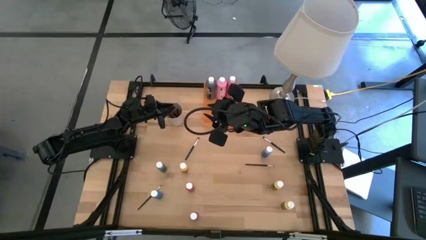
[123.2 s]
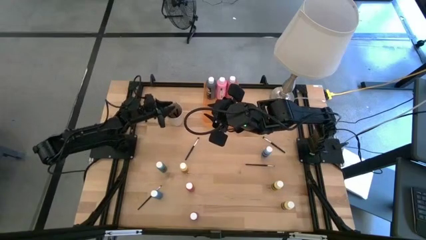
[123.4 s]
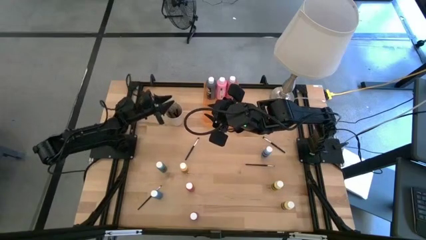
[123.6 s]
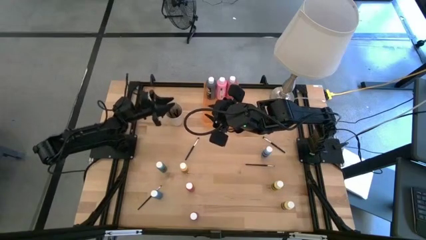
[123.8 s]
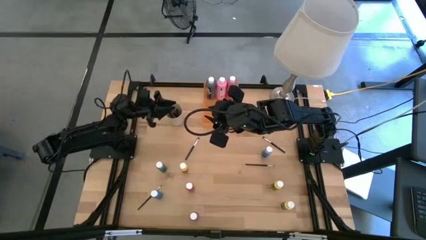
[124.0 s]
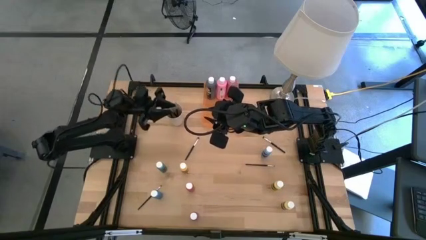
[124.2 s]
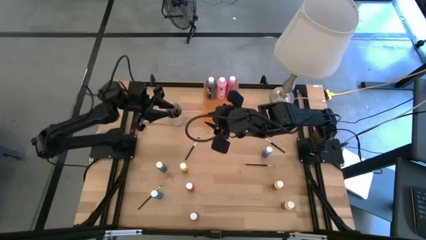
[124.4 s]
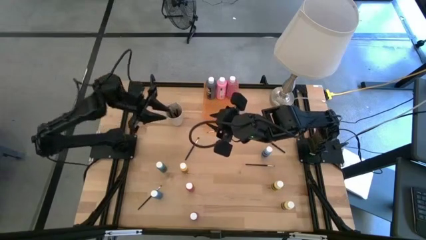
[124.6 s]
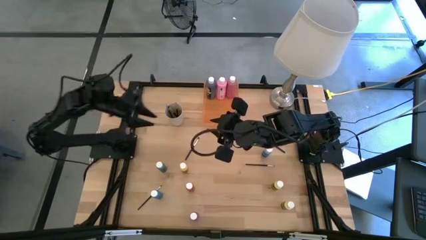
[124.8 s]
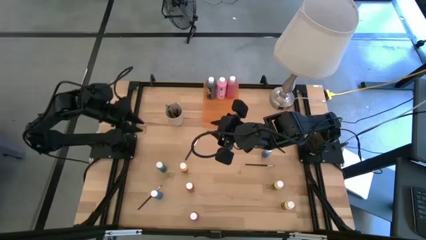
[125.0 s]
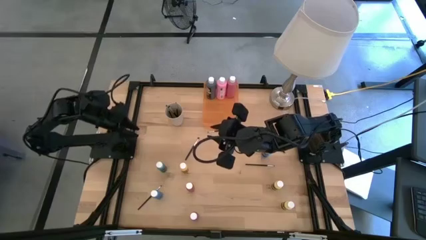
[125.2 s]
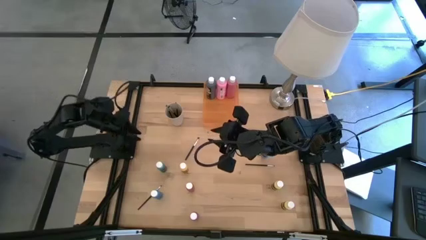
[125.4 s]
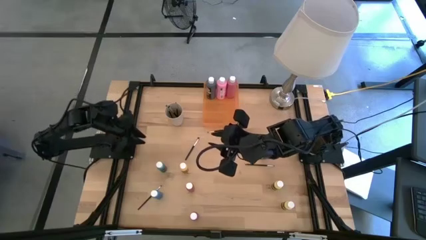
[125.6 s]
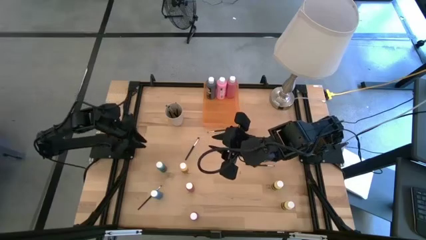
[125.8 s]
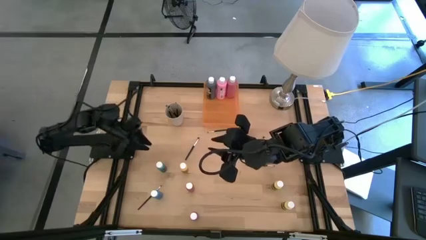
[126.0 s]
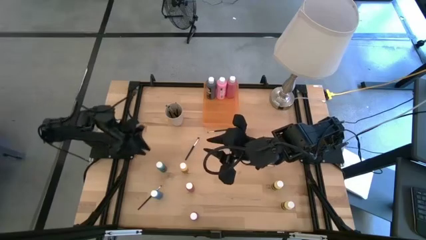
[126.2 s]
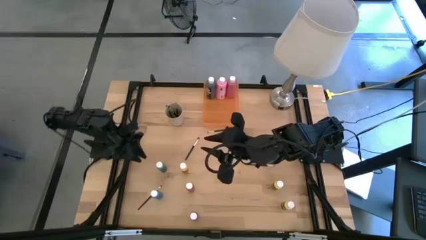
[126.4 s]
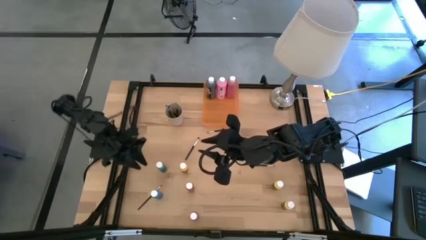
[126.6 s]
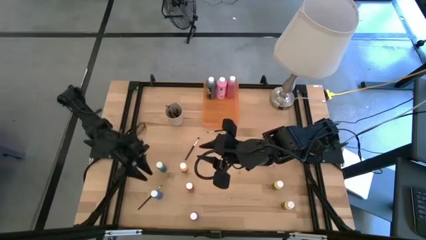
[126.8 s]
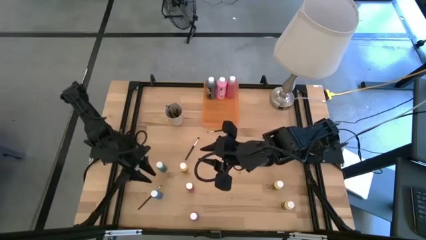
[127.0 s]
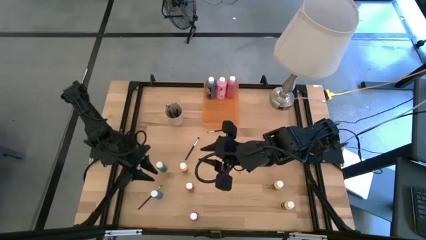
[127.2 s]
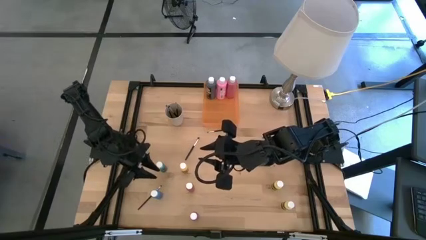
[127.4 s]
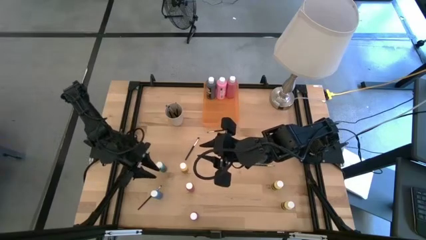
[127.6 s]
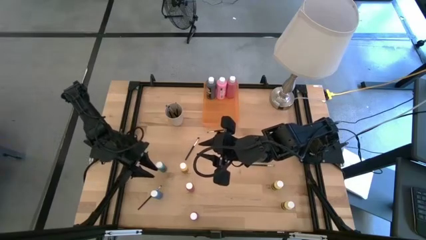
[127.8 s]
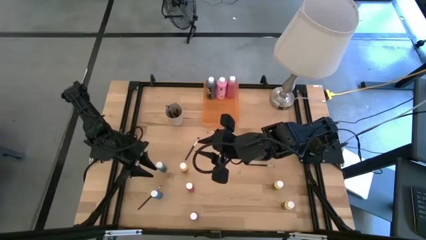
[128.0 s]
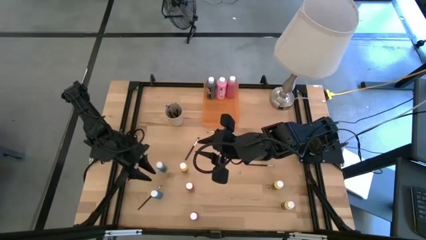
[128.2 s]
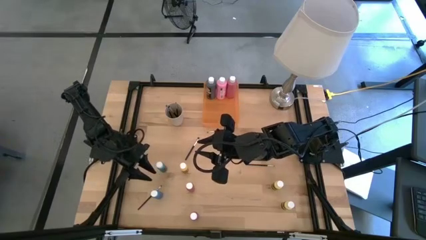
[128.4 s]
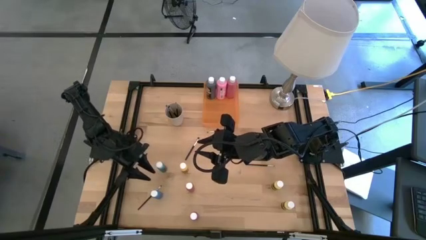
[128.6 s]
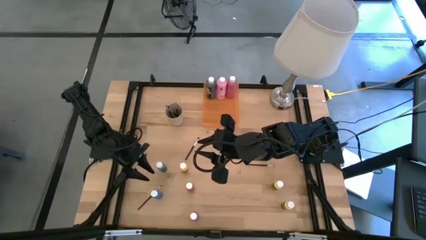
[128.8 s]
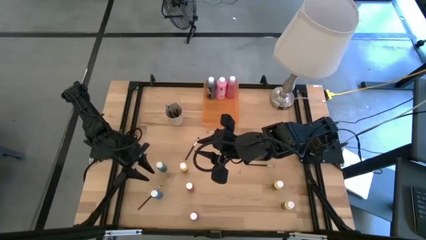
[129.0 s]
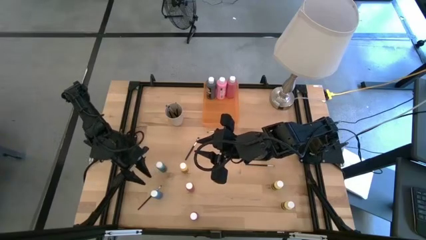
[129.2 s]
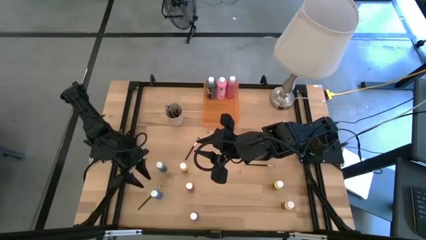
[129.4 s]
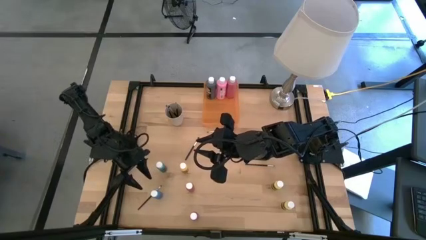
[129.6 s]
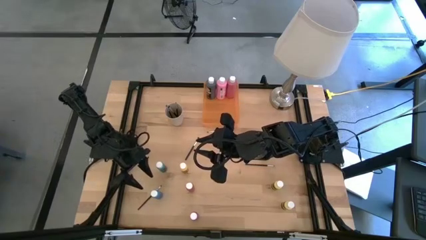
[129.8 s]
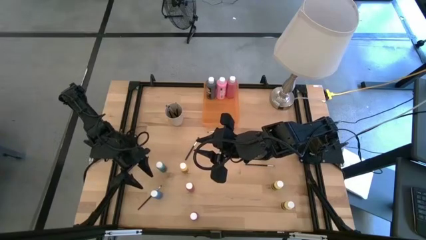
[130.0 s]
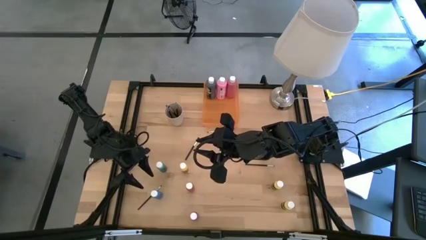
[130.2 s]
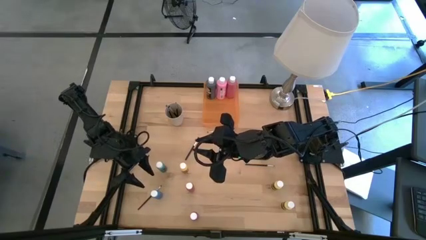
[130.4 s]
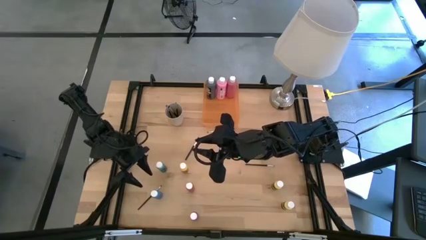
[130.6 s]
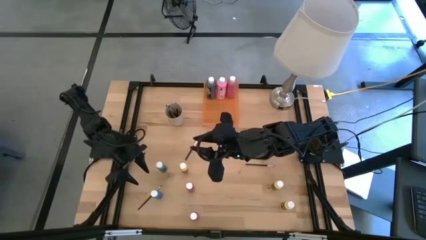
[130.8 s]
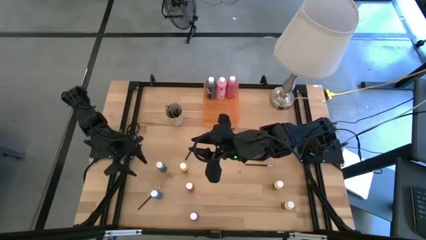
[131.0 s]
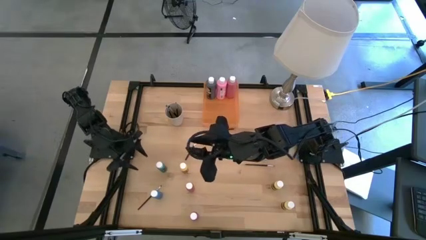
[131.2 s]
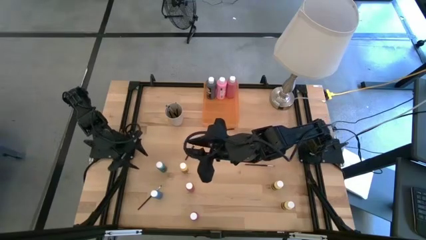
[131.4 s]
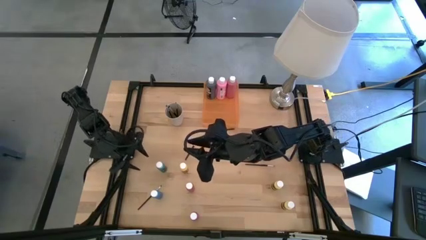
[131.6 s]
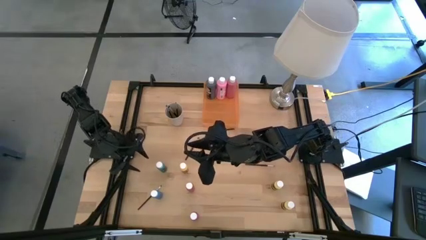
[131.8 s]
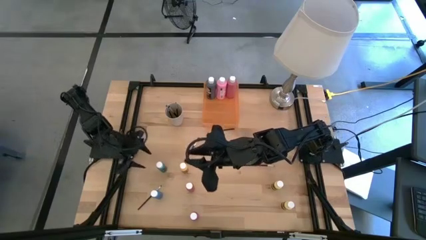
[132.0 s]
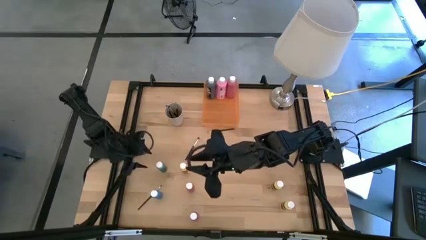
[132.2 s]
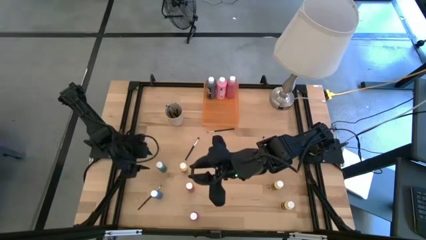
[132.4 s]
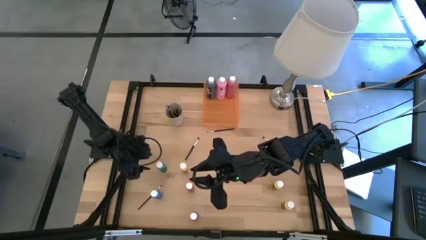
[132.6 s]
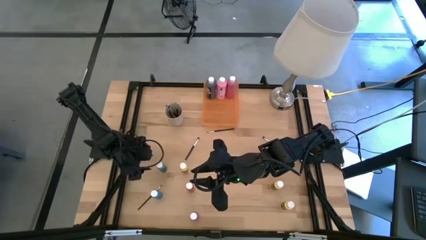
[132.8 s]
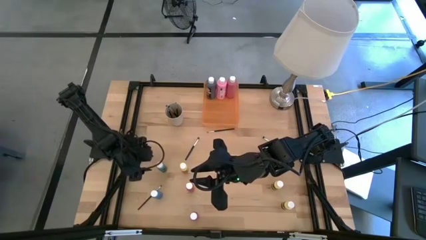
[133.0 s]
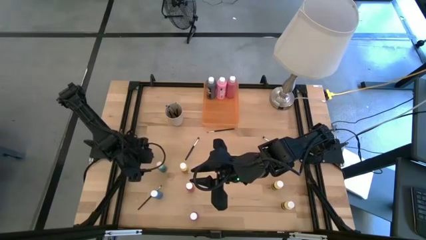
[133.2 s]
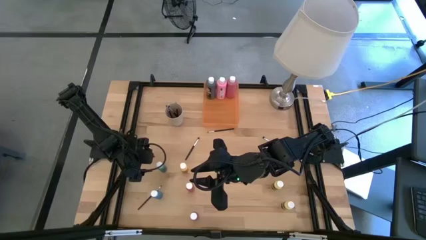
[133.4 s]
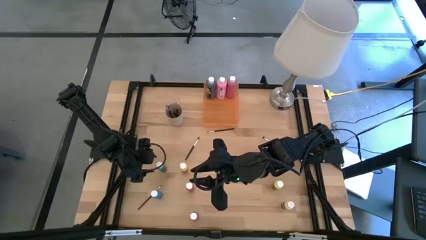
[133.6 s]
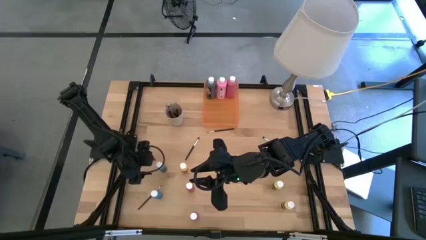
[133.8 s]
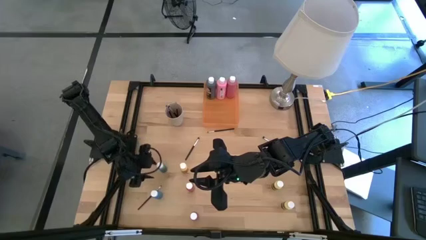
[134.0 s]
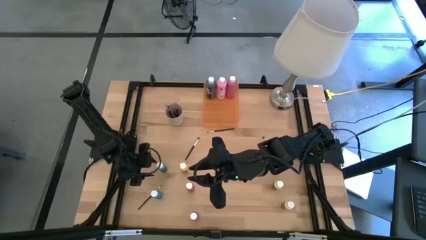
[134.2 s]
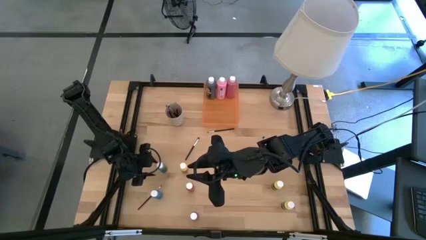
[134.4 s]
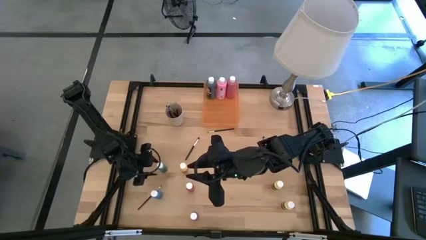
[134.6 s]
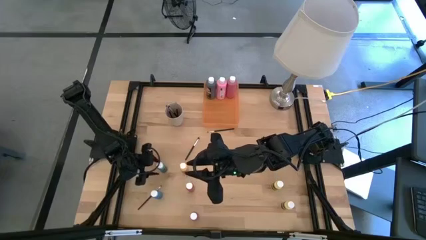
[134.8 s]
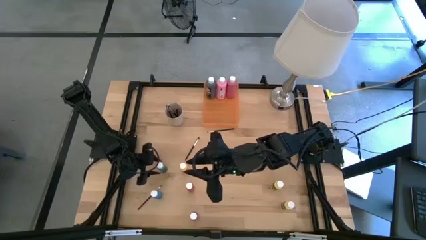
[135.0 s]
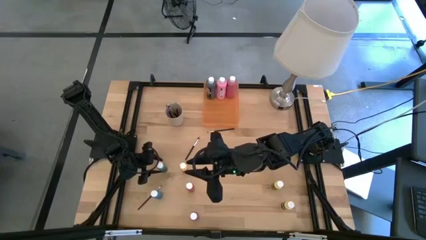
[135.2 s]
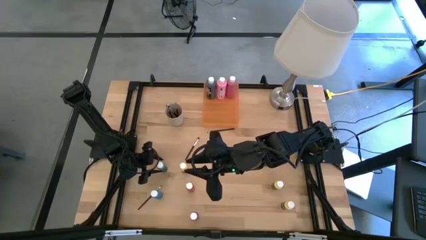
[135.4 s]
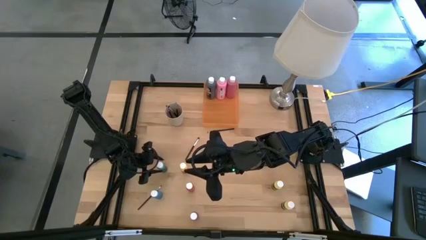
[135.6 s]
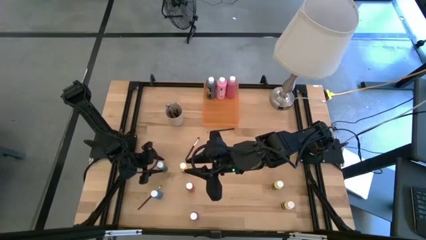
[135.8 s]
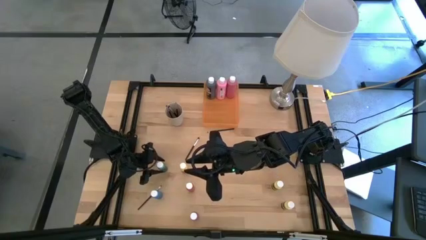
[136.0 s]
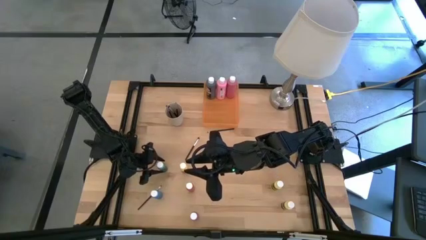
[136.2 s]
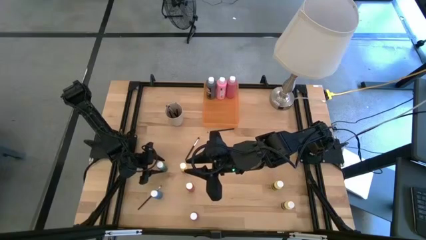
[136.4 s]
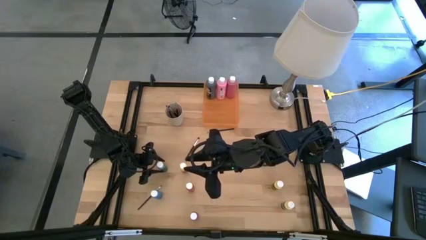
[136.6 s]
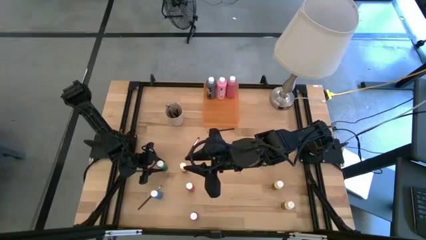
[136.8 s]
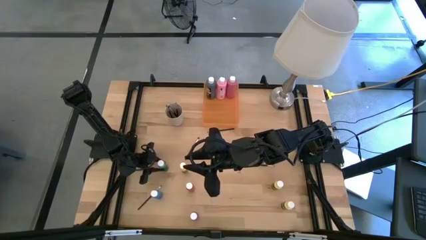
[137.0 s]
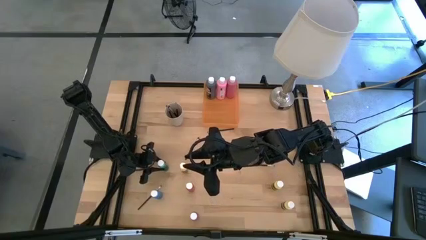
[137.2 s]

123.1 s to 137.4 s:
Task: Pick & Place Paint Supplies
Put the green paint bottle into the orange bin

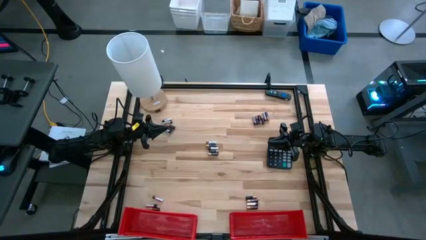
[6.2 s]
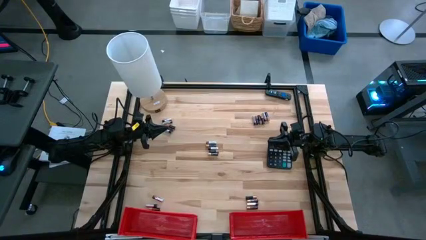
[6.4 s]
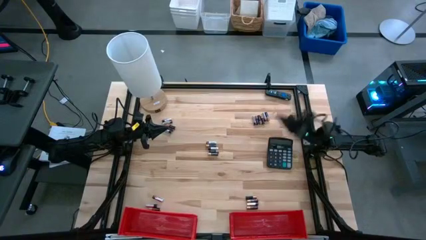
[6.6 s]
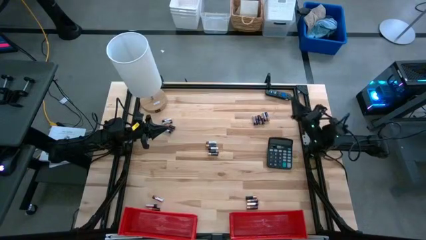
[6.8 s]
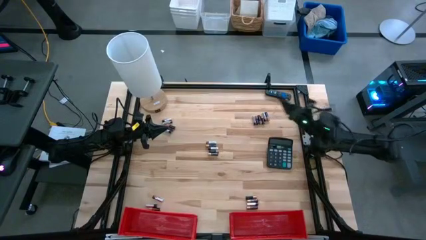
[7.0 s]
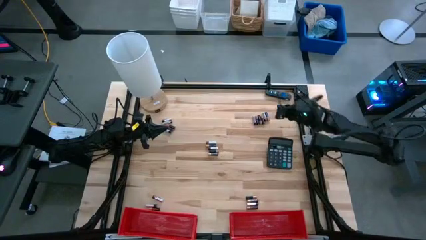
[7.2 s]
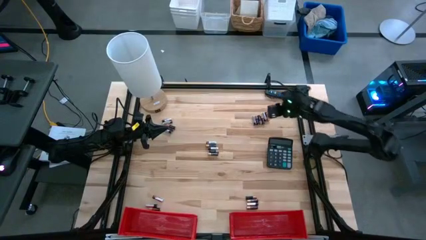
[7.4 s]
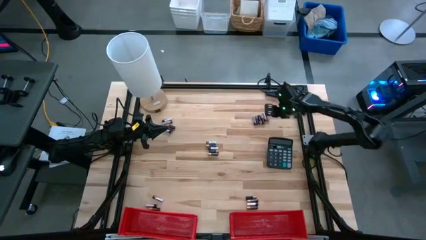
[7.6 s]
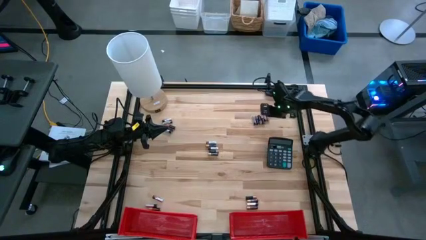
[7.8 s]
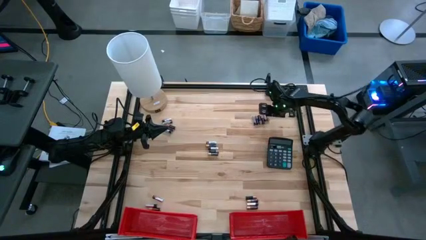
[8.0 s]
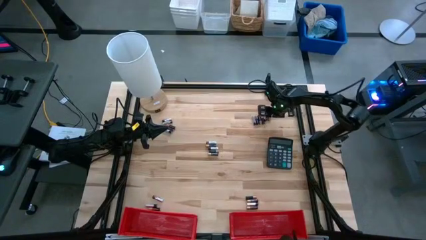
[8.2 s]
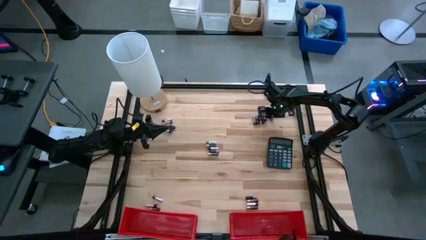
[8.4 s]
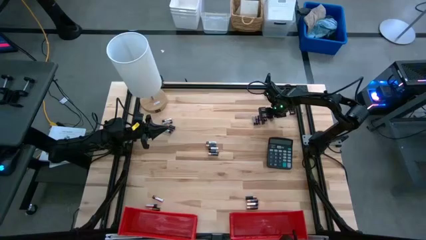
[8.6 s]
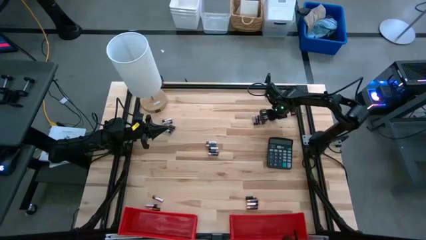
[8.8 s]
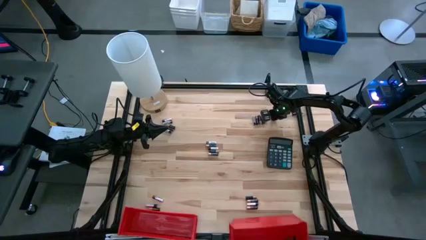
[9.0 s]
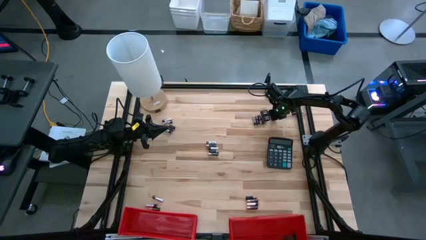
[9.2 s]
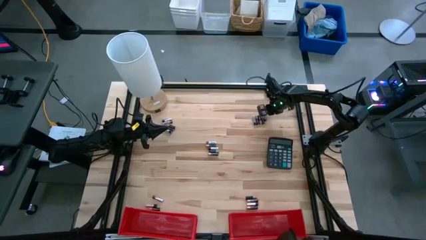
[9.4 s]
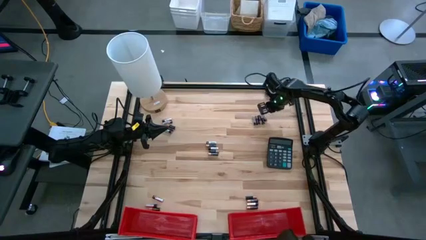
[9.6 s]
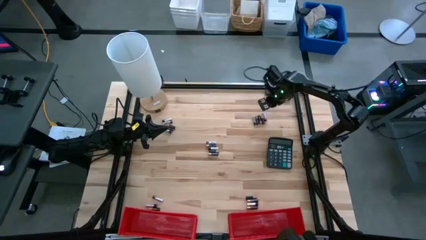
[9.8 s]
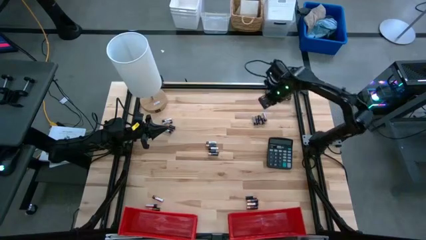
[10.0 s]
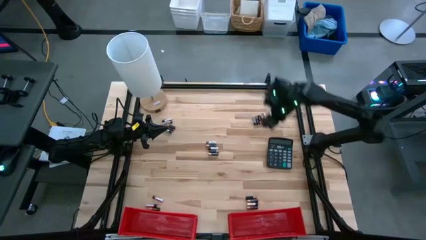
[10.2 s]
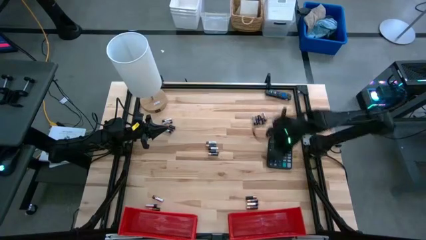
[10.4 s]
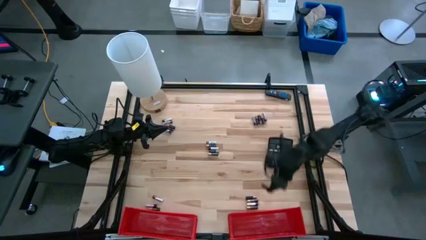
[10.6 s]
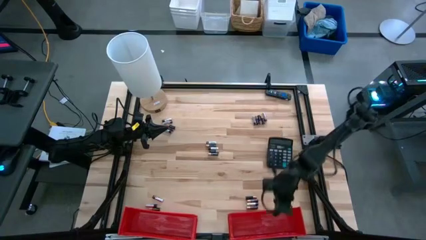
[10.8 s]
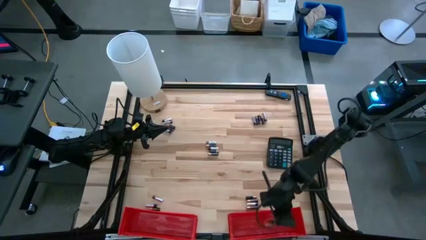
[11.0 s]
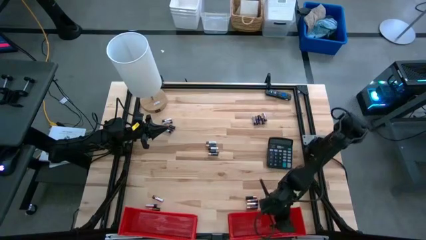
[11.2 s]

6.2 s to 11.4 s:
Task: Sort batteries
Put the black-brown battery into the right red bin
